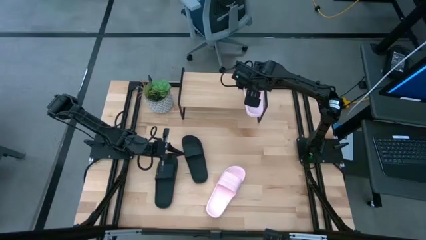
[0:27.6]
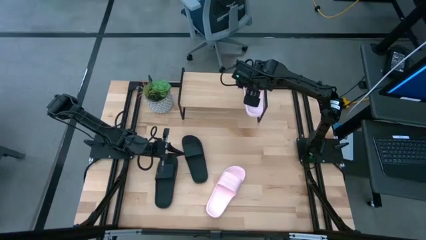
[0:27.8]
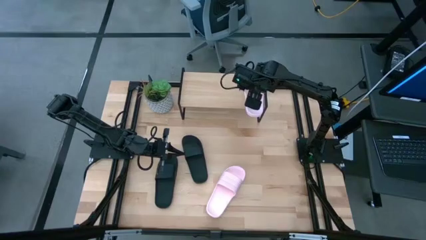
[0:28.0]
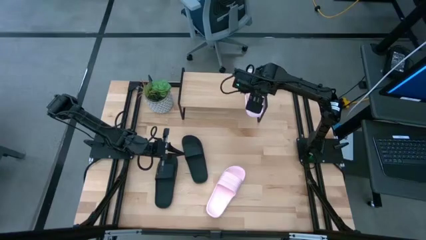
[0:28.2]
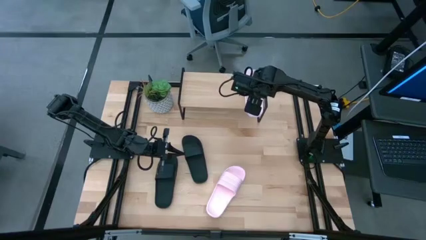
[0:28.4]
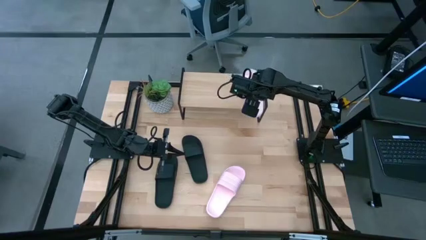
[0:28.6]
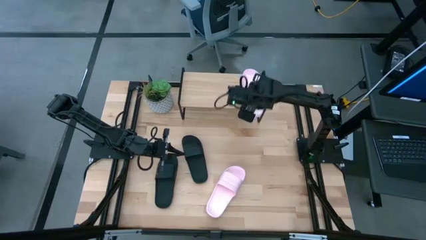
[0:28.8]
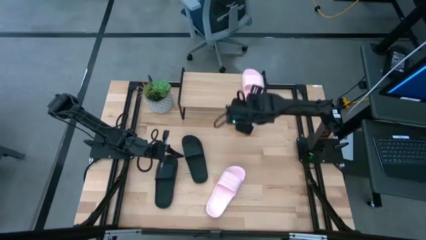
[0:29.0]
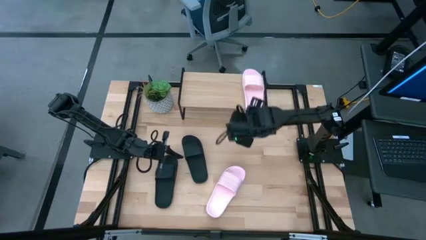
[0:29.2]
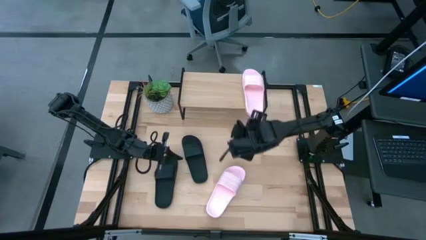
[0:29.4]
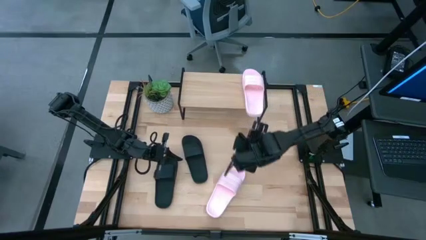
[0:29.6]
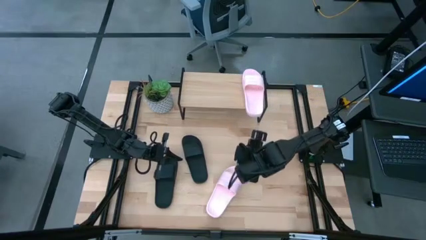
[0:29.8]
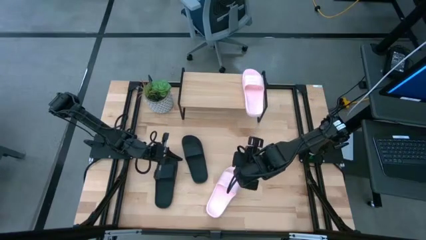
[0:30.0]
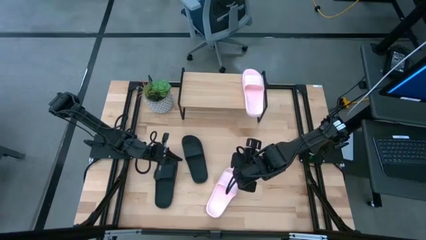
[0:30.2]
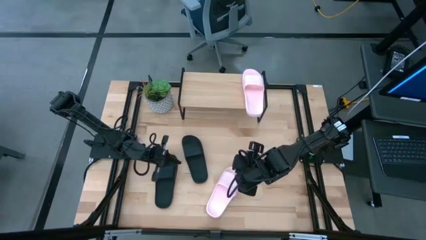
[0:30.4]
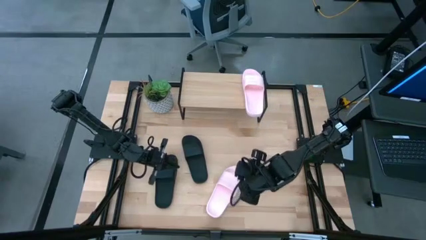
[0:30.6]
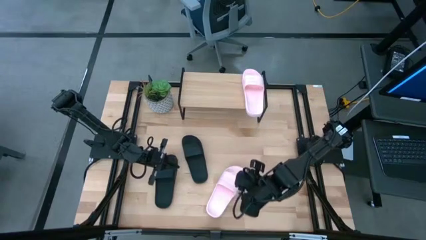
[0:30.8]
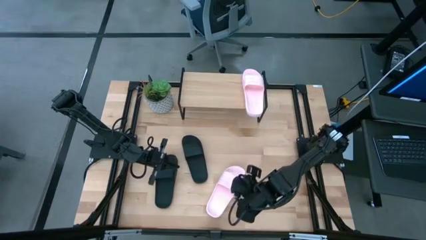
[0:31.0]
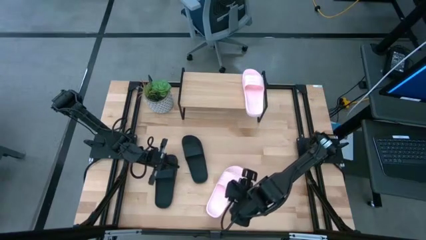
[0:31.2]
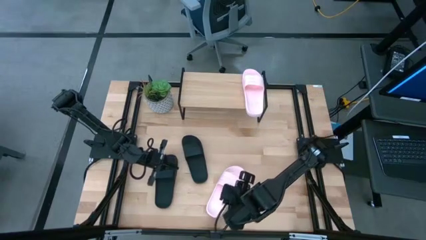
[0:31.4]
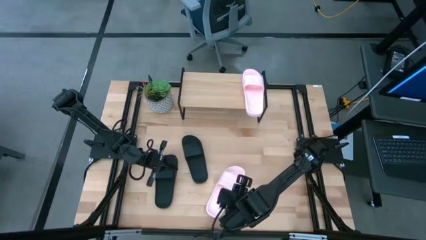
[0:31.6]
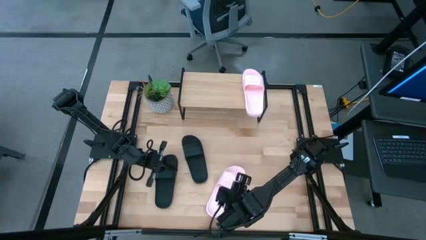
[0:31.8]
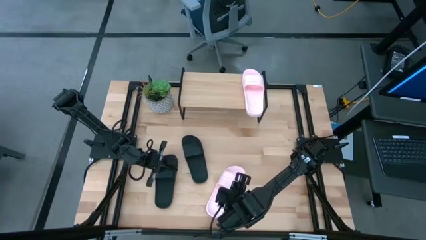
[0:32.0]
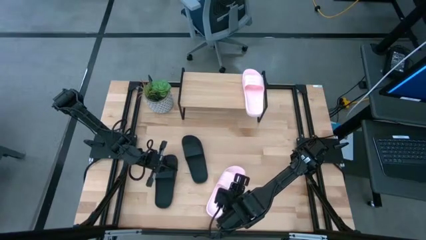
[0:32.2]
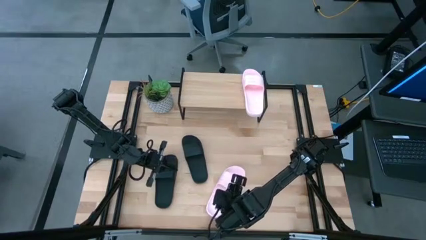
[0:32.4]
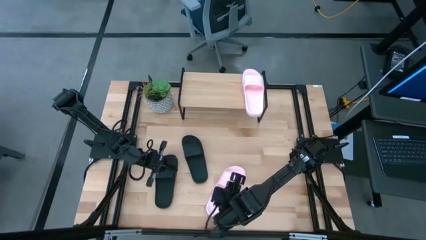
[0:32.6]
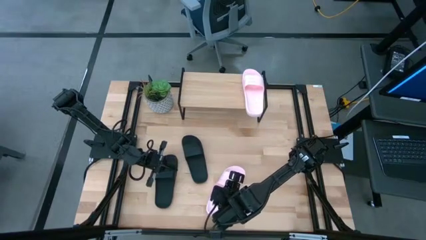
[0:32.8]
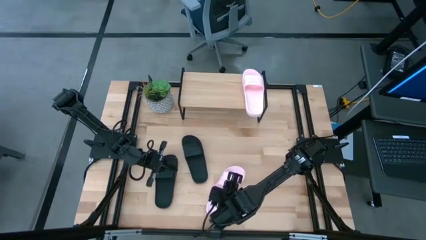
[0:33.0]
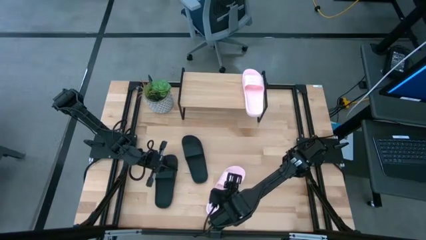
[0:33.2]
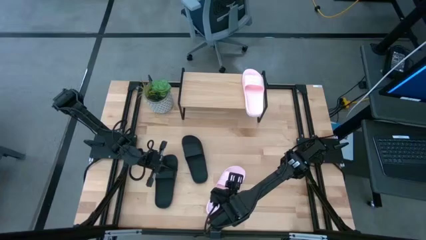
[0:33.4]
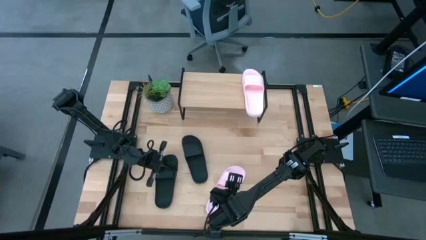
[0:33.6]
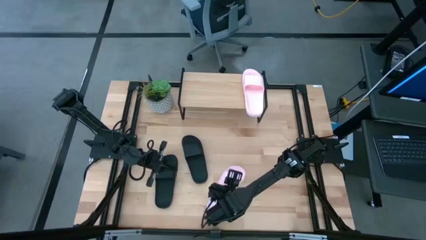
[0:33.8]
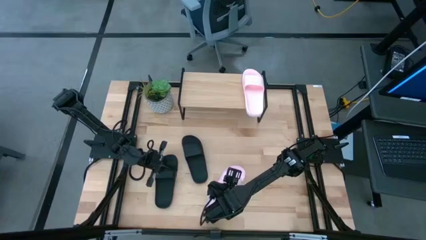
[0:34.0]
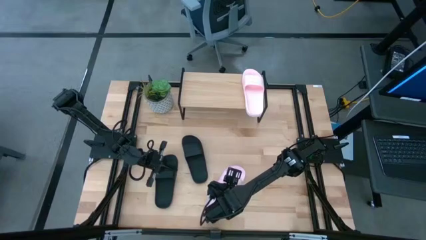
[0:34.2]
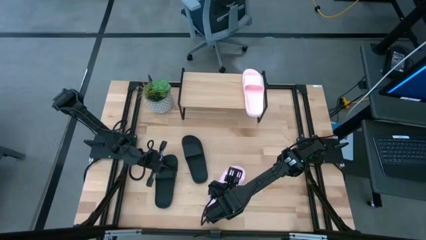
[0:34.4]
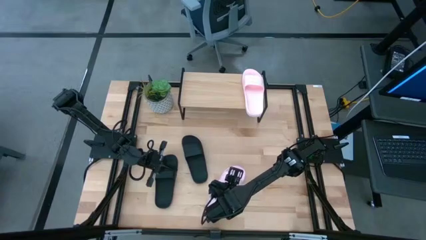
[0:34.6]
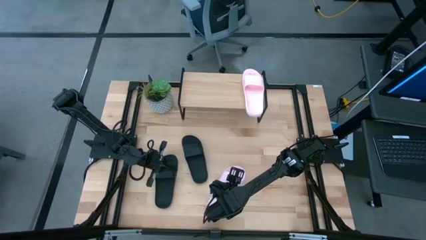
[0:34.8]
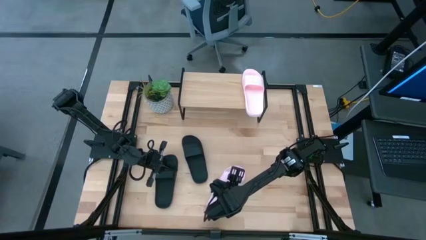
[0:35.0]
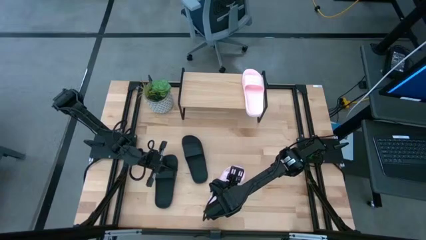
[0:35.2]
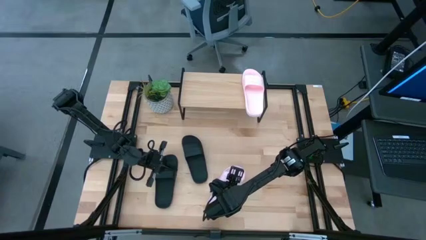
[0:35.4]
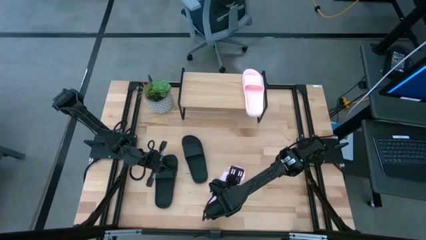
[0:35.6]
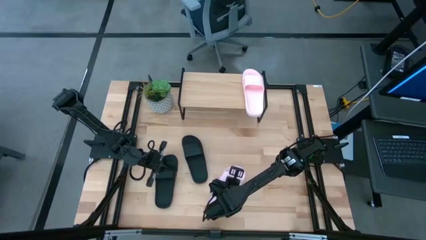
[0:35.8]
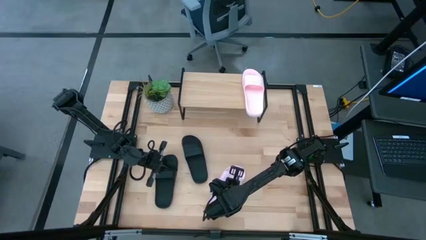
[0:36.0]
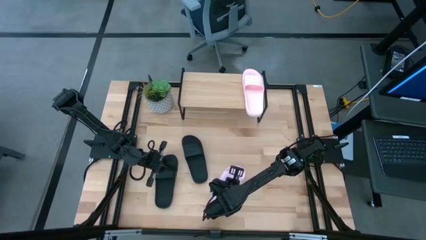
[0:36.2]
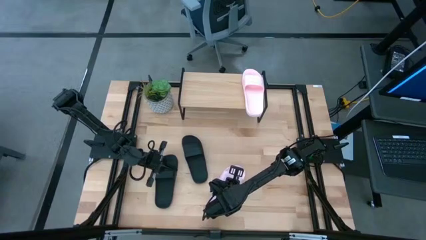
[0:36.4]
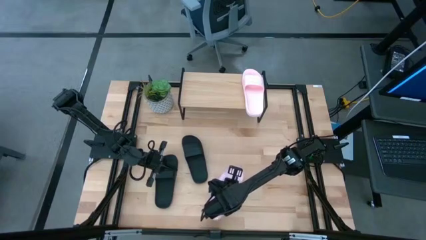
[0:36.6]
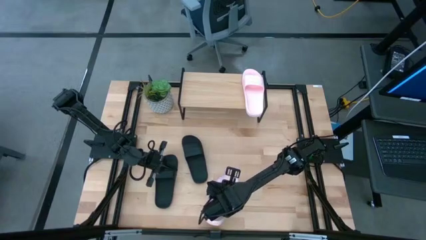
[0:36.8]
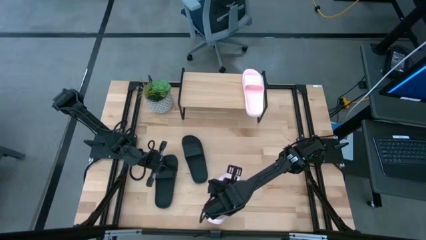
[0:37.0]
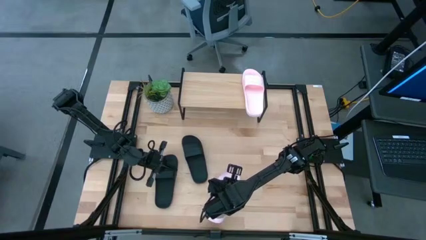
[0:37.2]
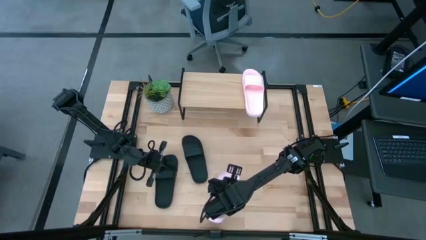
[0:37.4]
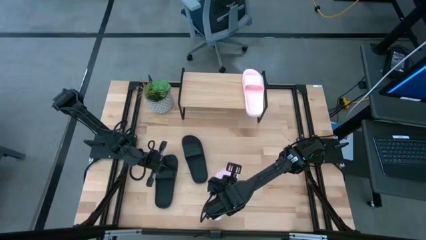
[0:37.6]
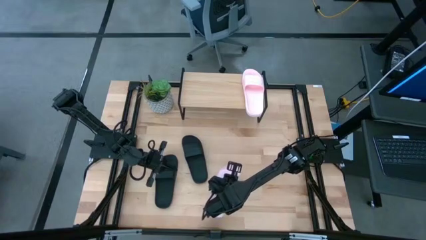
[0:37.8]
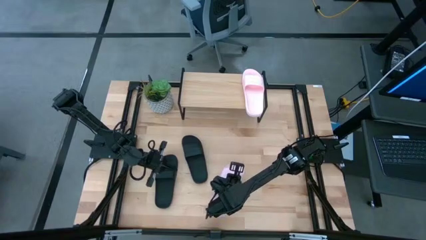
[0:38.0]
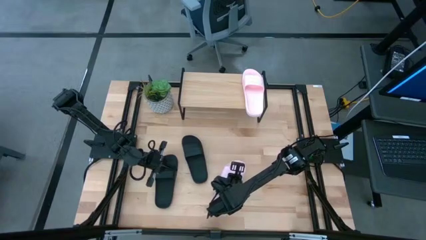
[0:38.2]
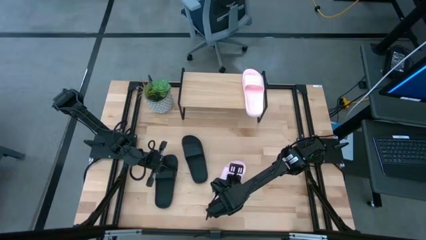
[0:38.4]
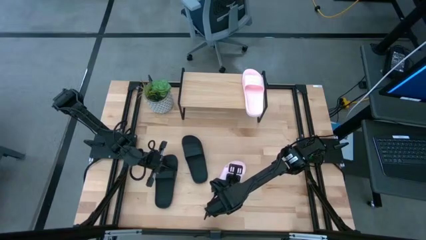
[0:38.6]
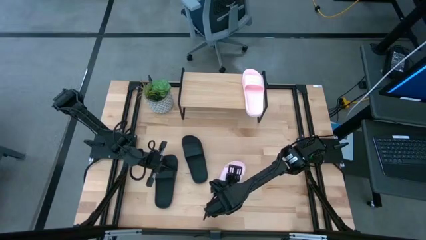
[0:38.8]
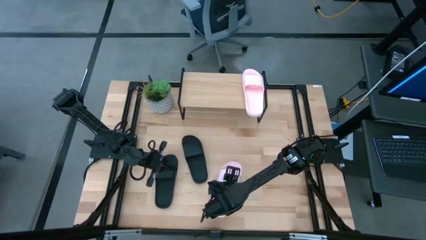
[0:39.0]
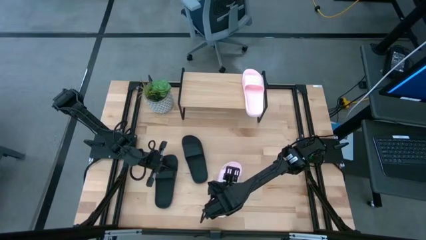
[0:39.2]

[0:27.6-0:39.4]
Task: Pick and place slides into the shelf
Put the pink slide on the shelf
